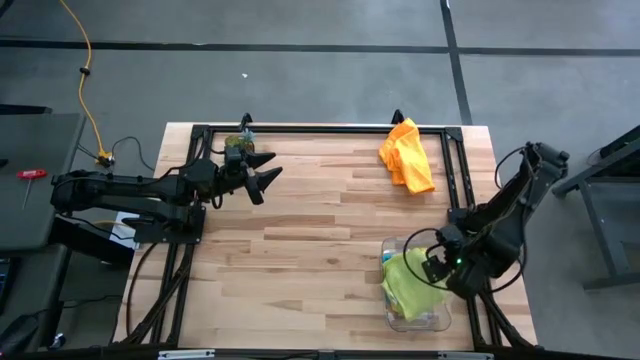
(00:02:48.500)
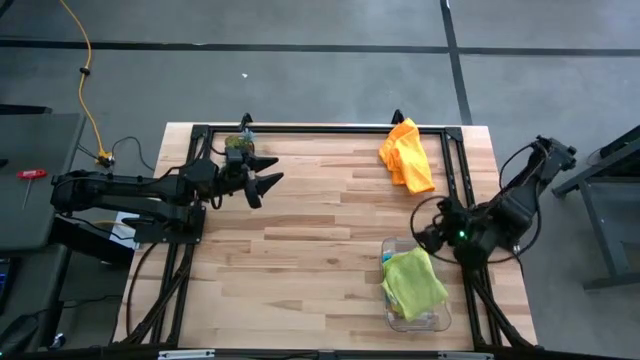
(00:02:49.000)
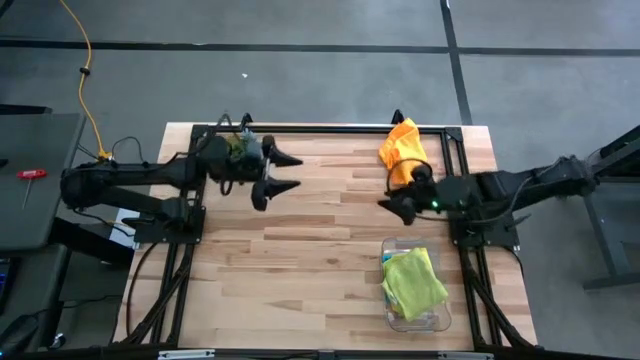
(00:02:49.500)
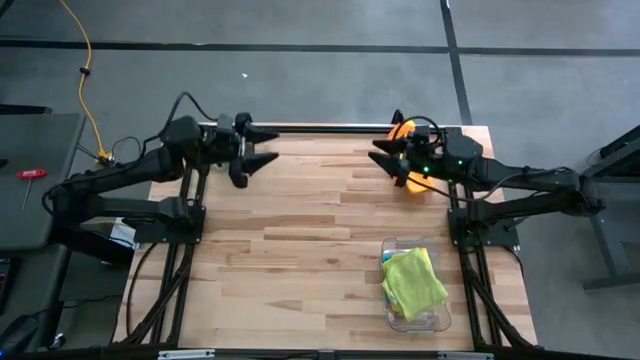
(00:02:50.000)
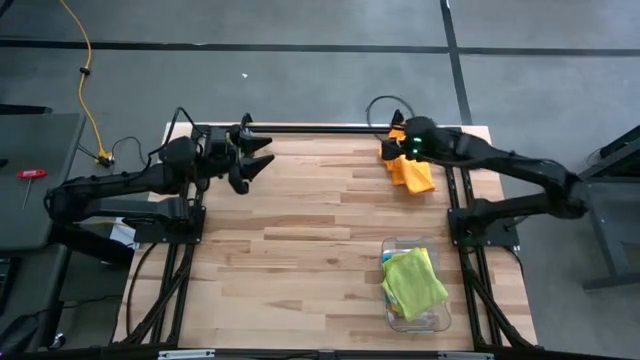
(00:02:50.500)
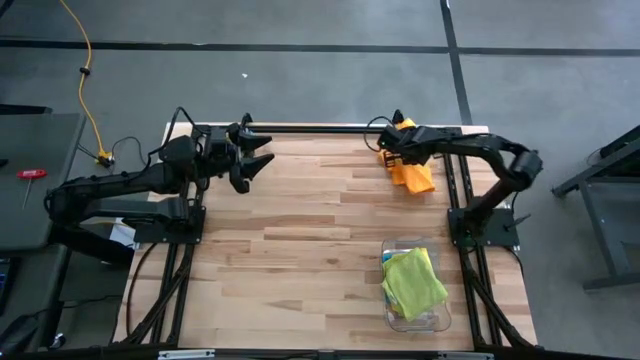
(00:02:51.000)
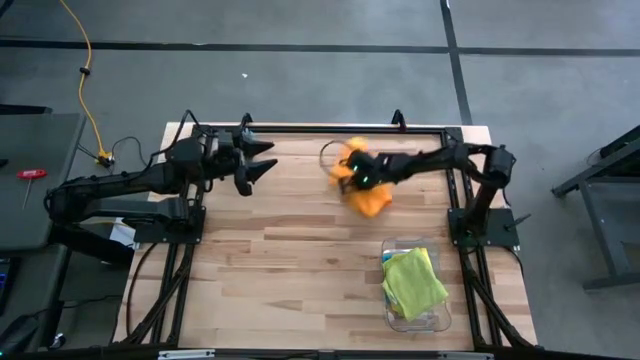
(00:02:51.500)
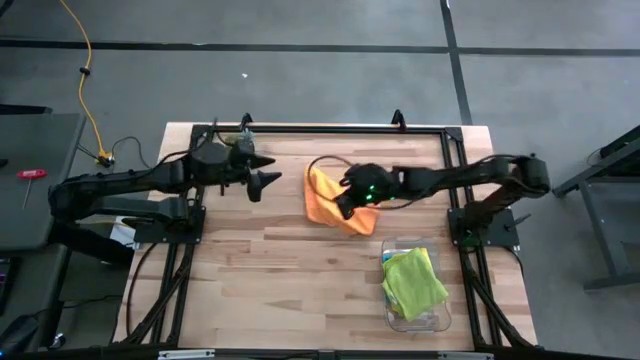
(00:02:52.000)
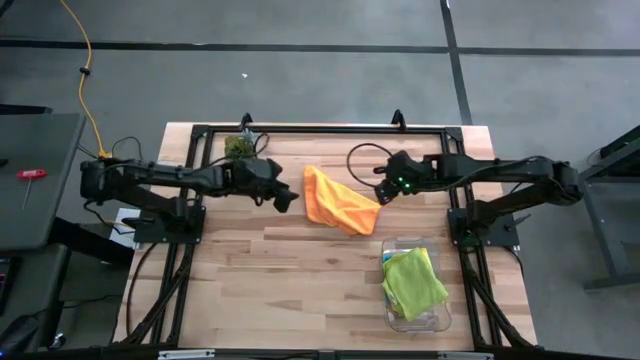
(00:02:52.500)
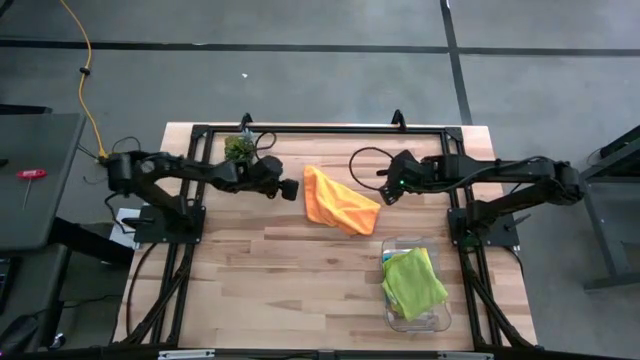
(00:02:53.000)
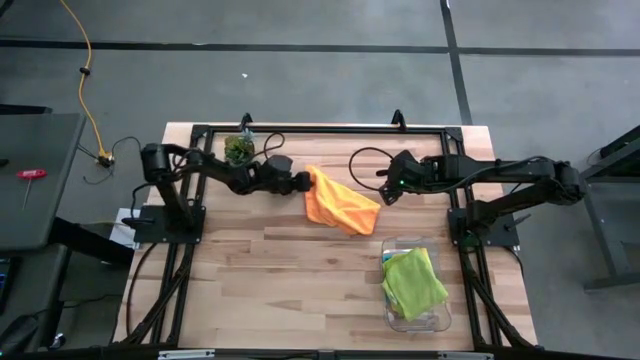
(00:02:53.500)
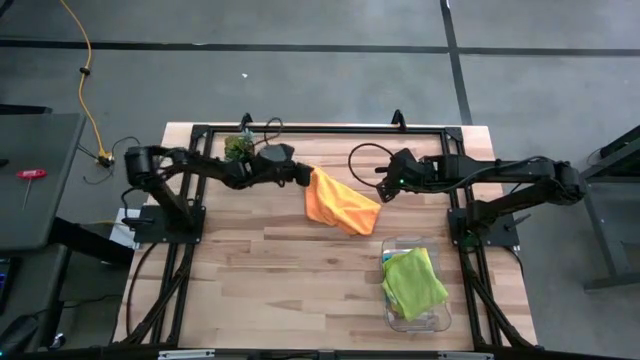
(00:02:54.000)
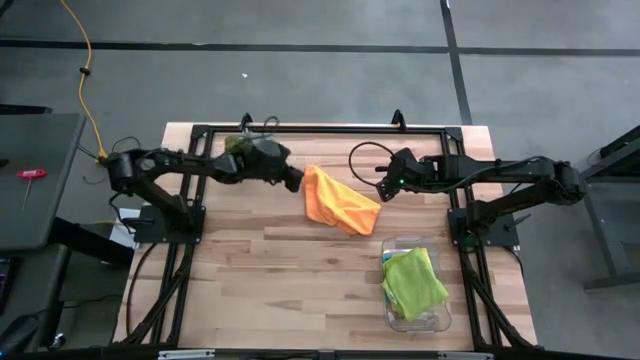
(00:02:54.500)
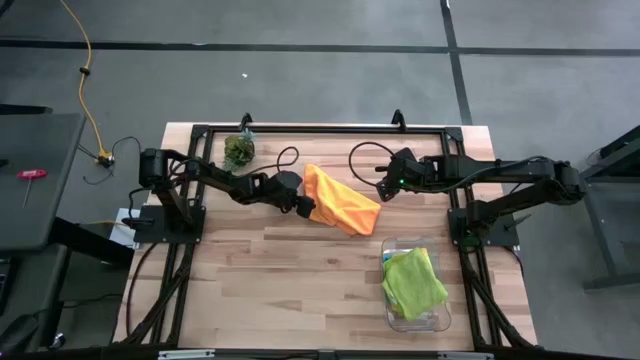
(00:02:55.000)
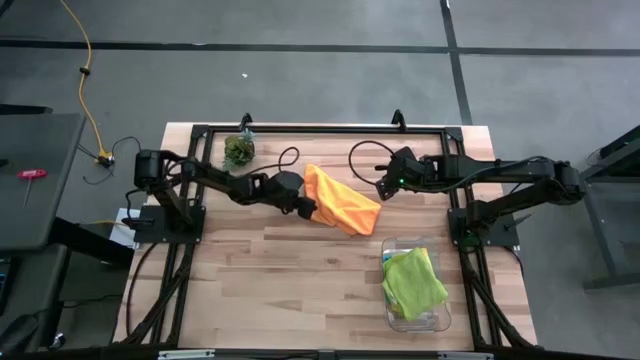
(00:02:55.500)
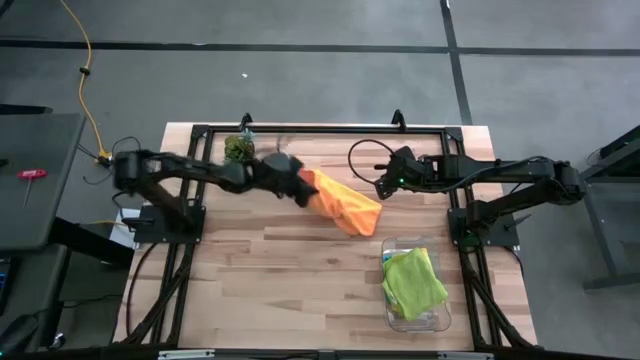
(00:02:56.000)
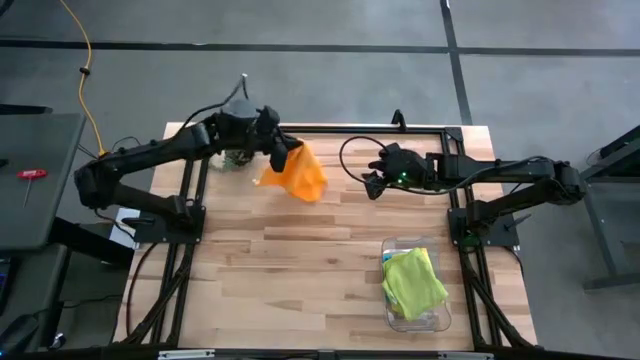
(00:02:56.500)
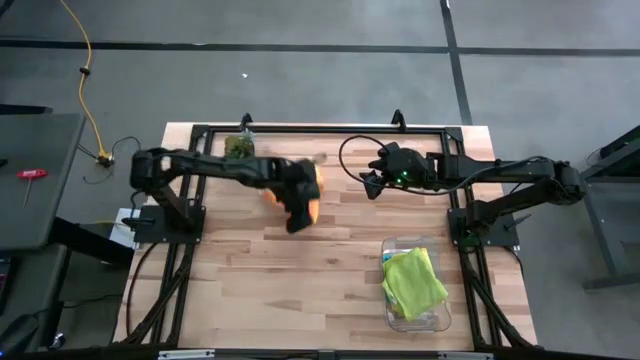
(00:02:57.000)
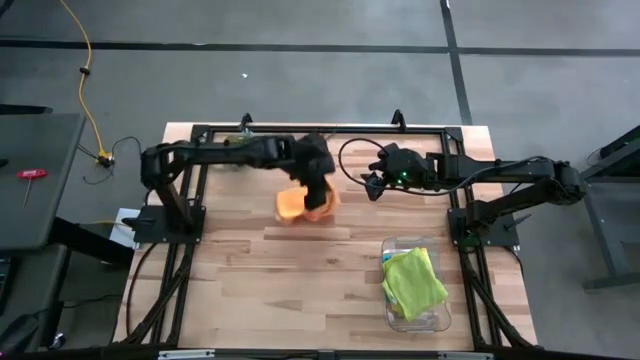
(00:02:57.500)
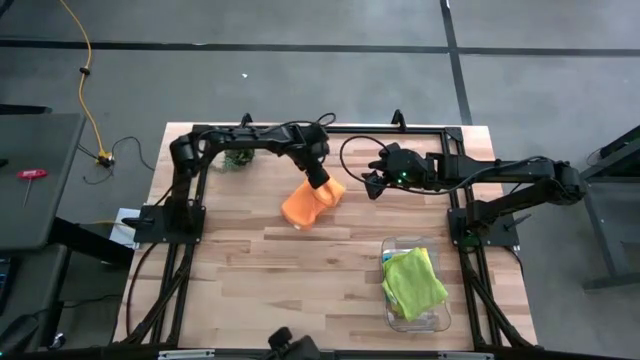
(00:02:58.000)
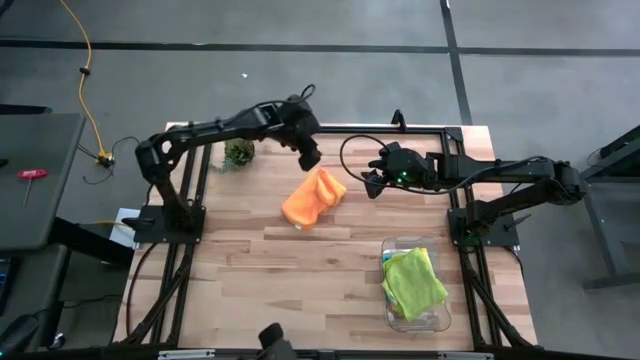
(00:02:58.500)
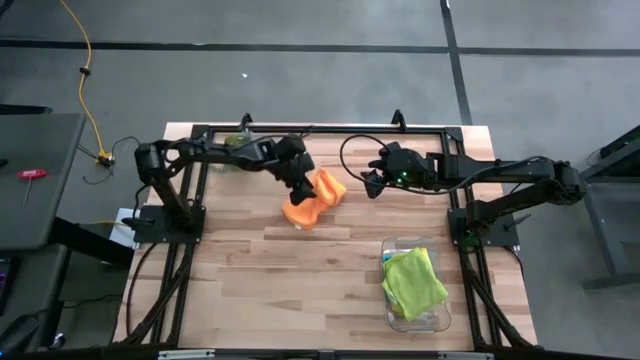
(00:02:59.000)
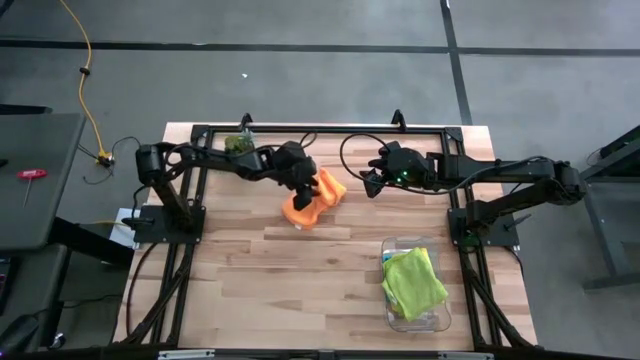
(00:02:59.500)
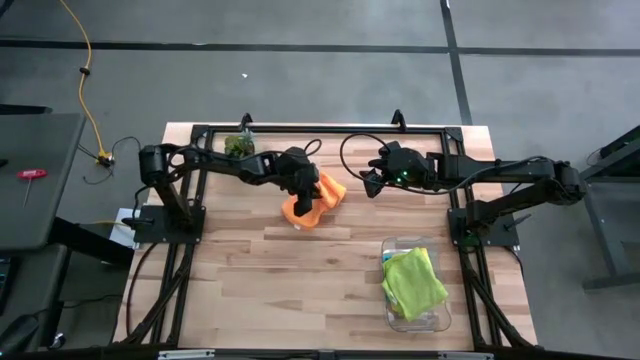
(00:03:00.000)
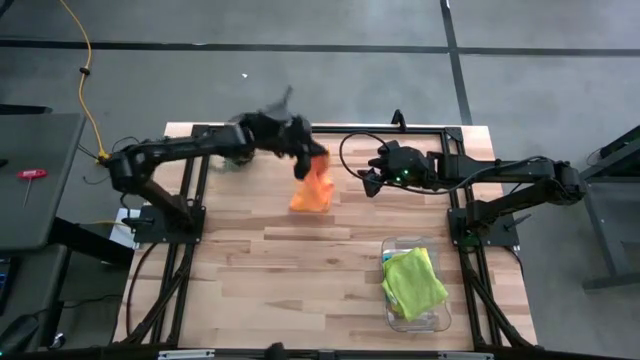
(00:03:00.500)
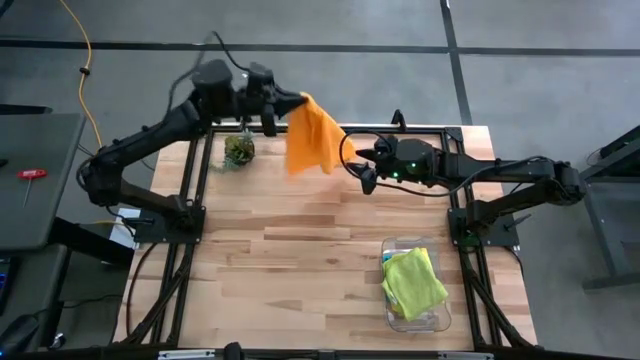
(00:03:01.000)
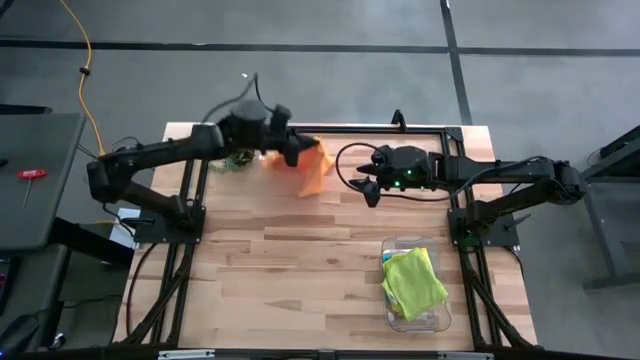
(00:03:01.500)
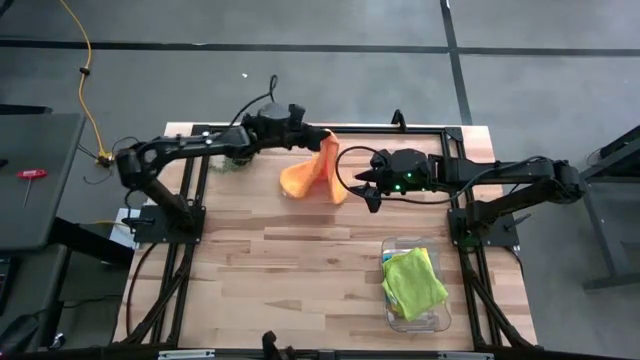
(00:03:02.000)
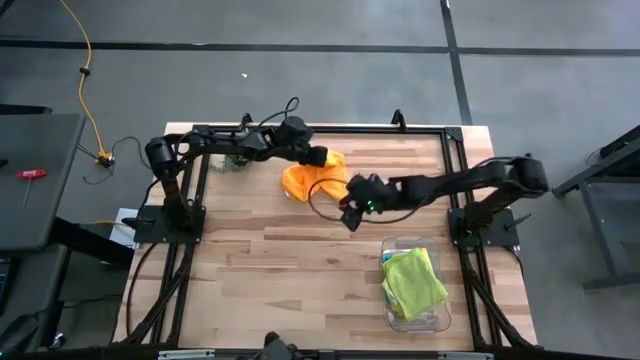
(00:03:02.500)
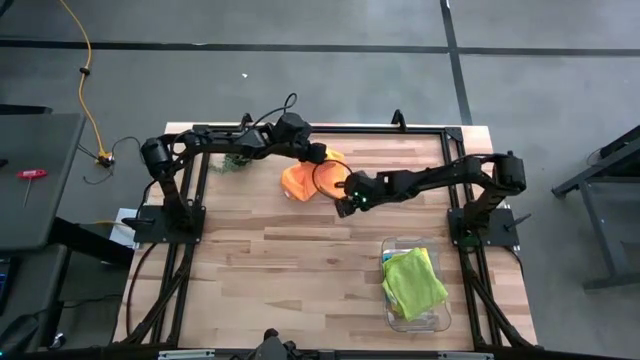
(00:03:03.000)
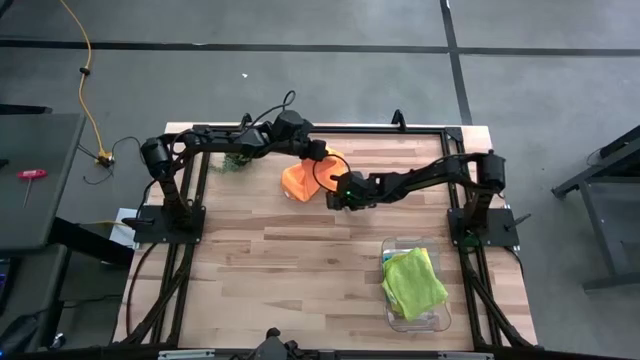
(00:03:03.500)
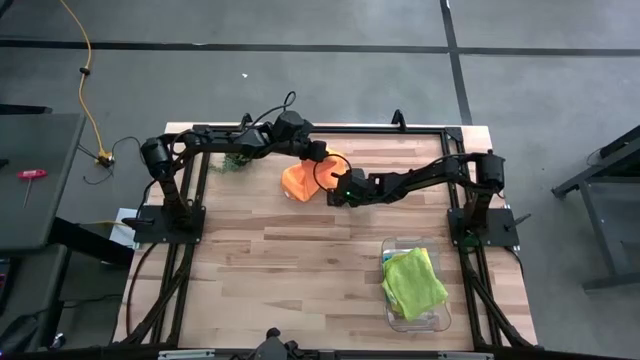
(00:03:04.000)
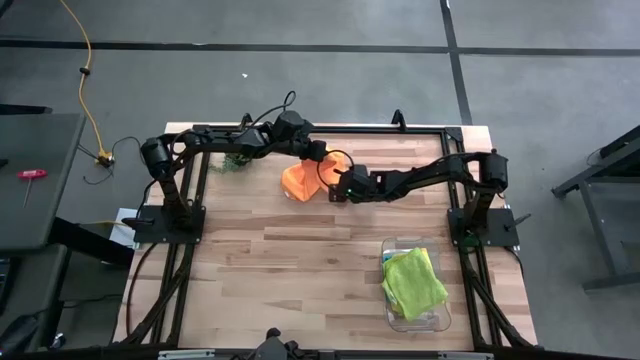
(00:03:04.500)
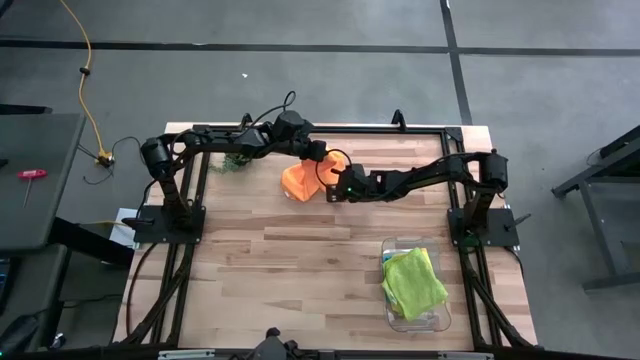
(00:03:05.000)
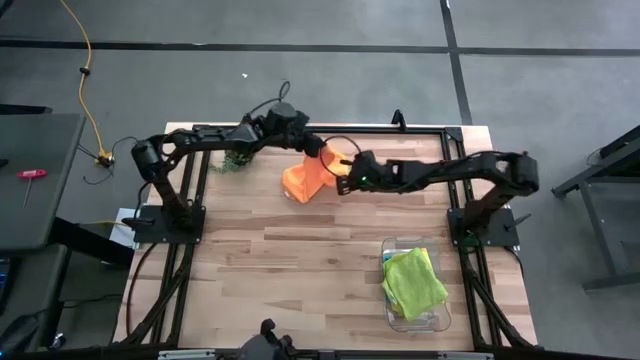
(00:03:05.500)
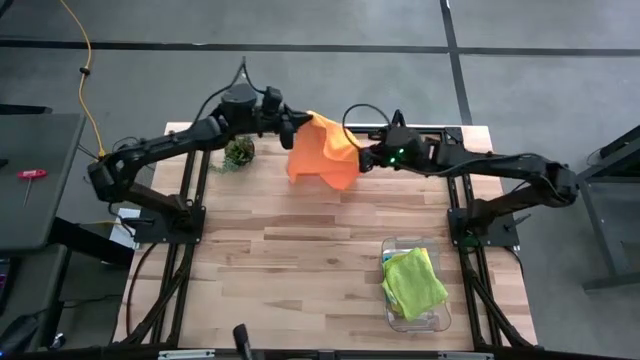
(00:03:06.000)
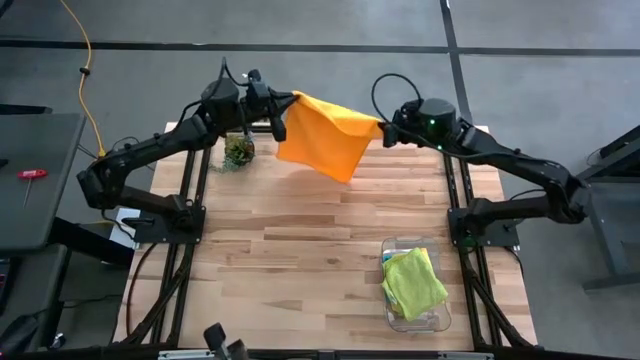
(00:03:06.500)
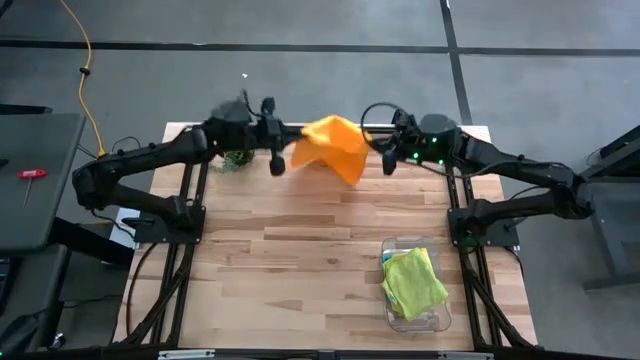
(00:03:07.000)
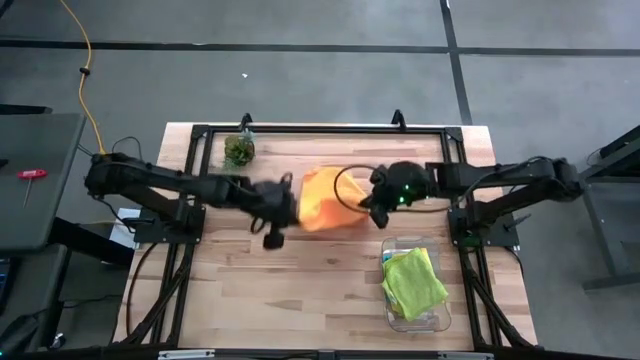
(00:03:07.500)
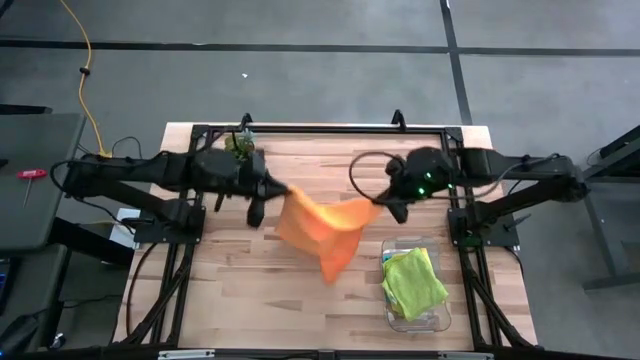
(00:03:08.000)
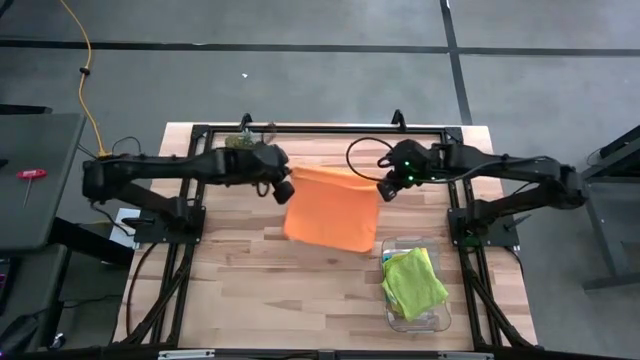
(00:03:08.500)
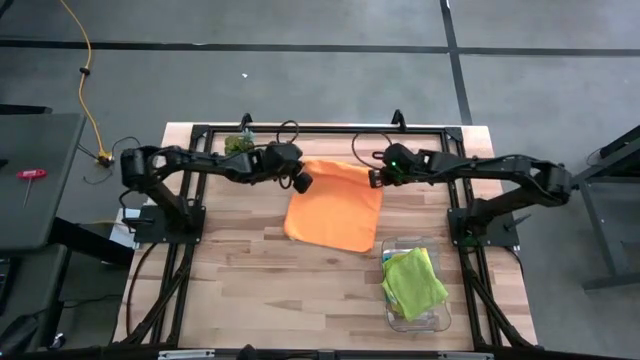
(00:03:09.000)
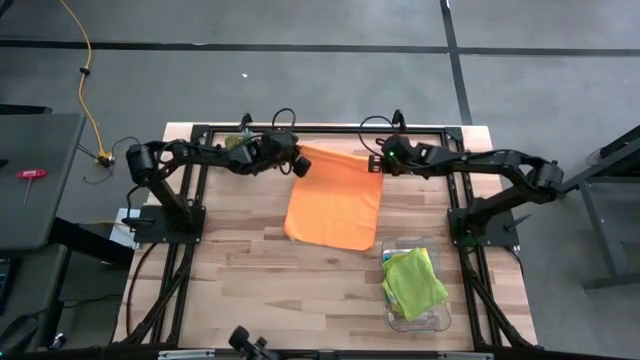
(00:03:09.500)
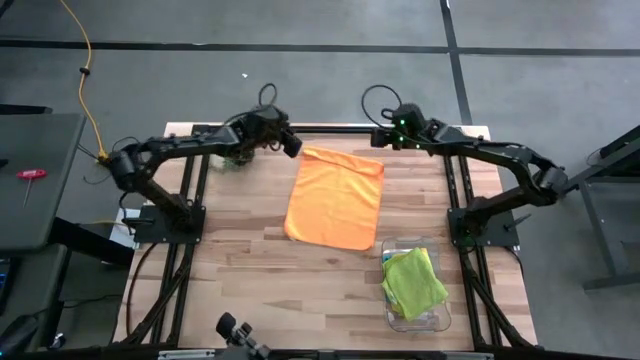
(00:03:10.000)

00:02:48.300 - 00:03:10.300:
Task: Fold microfiber towels
Fold the orange microfiber cloth
